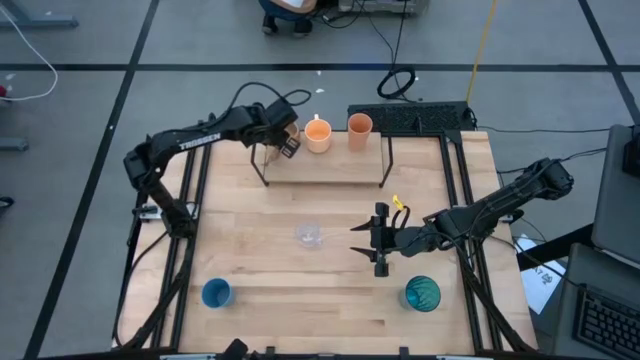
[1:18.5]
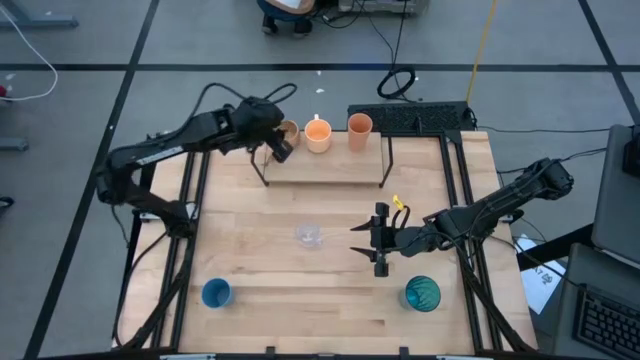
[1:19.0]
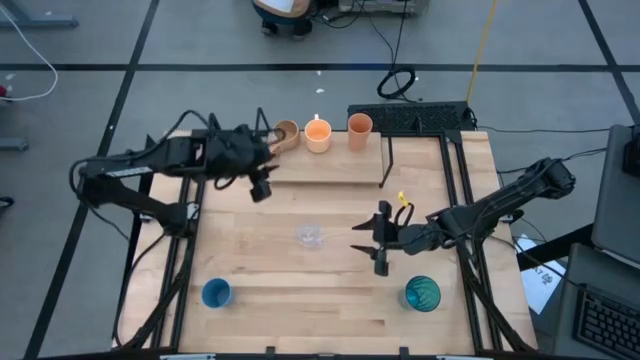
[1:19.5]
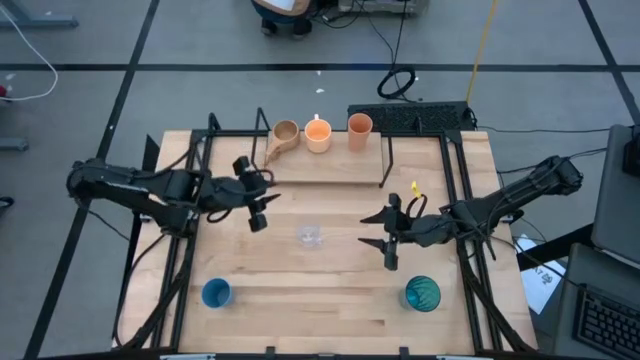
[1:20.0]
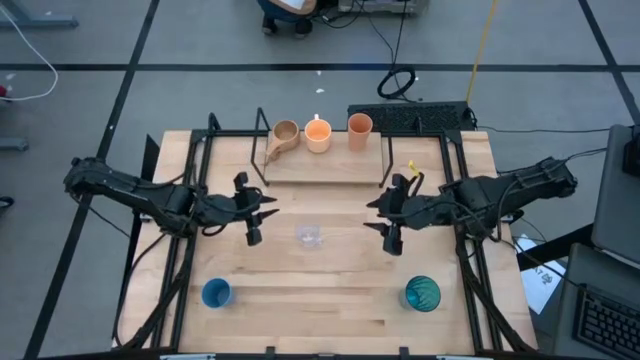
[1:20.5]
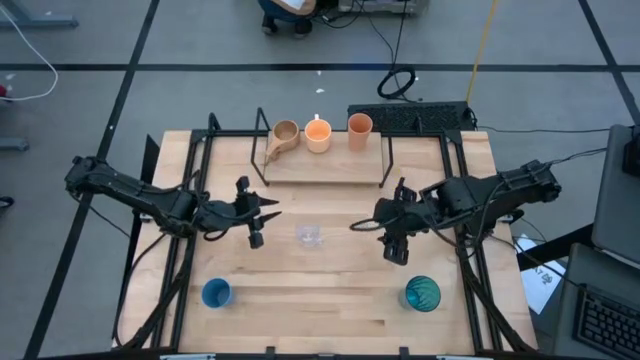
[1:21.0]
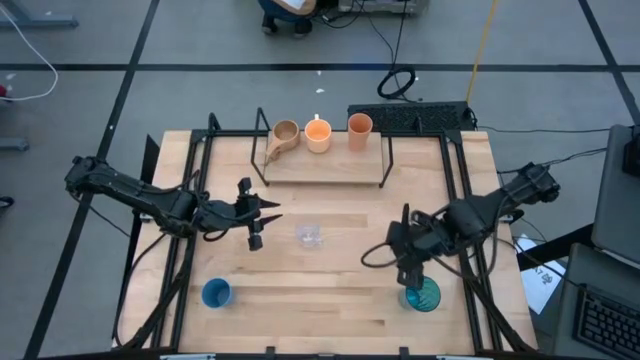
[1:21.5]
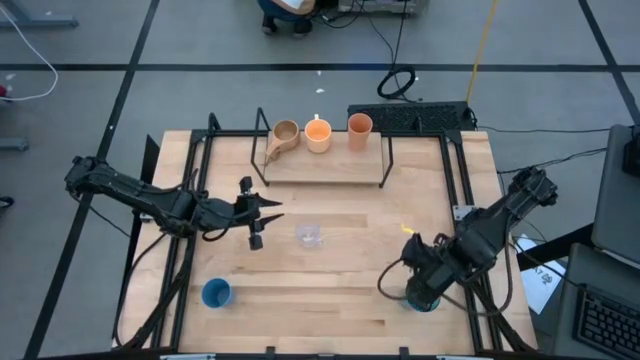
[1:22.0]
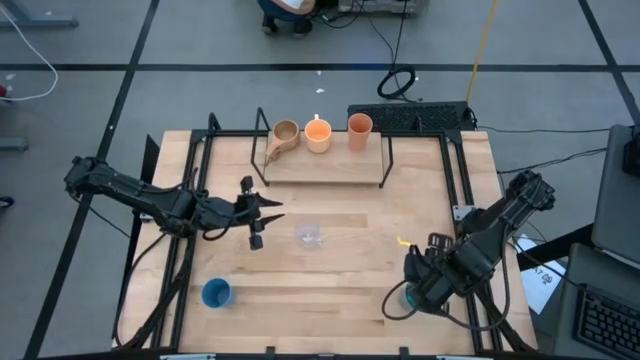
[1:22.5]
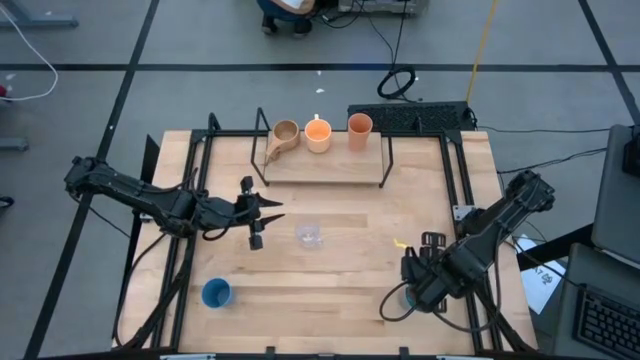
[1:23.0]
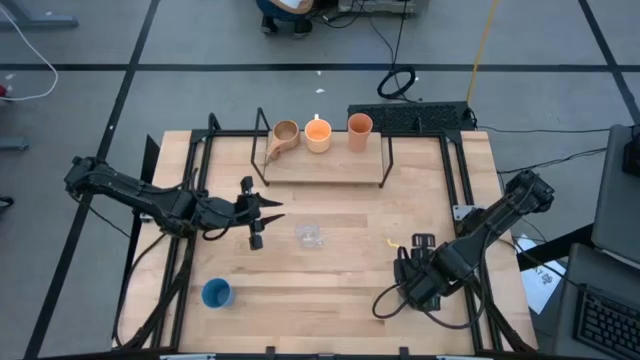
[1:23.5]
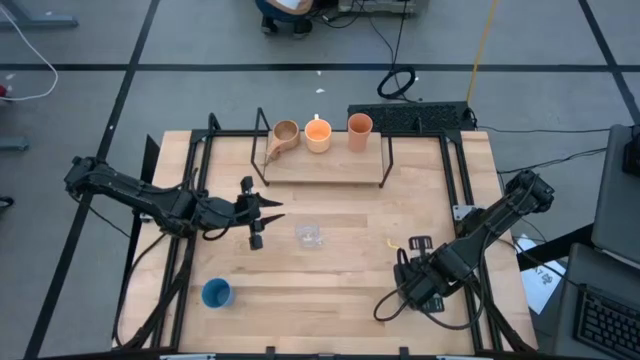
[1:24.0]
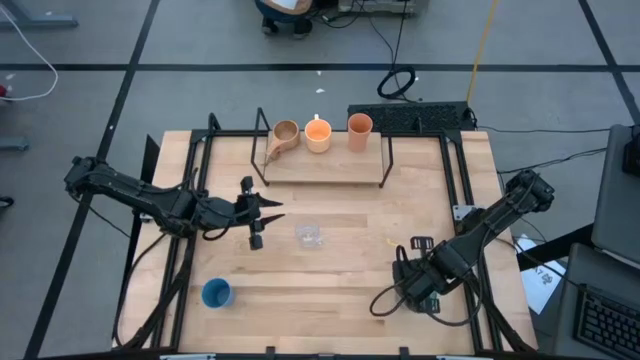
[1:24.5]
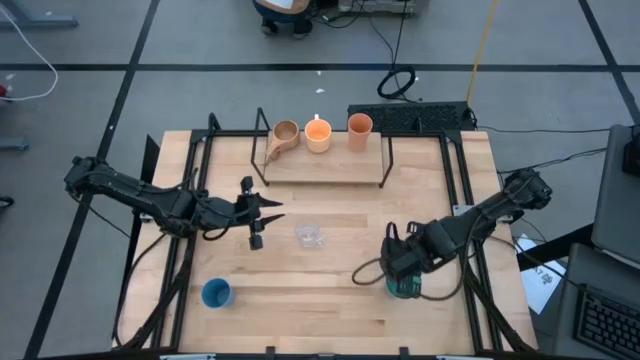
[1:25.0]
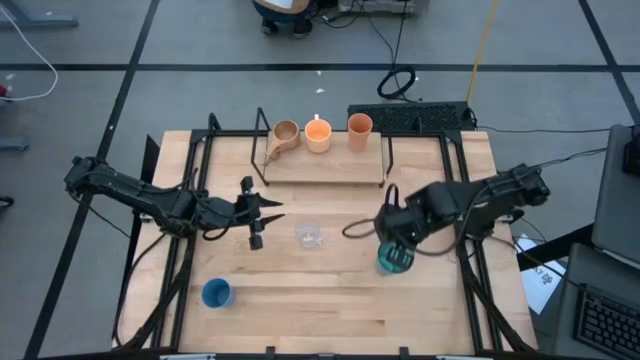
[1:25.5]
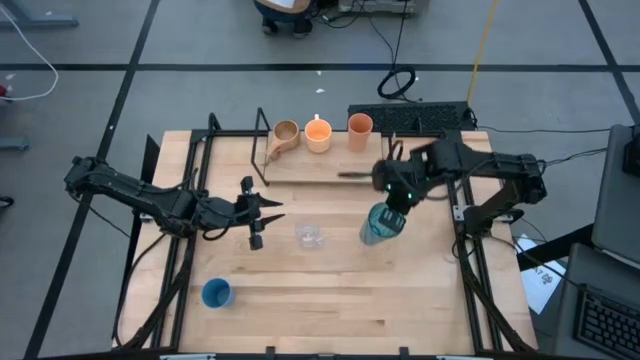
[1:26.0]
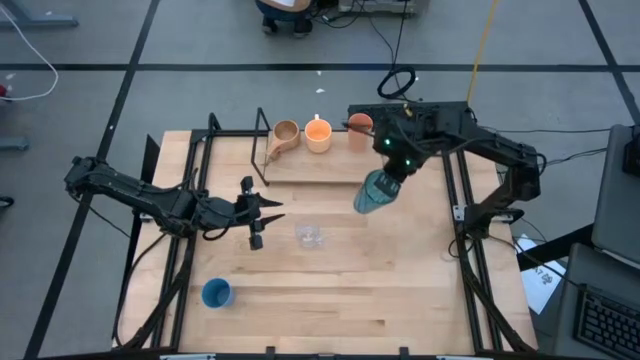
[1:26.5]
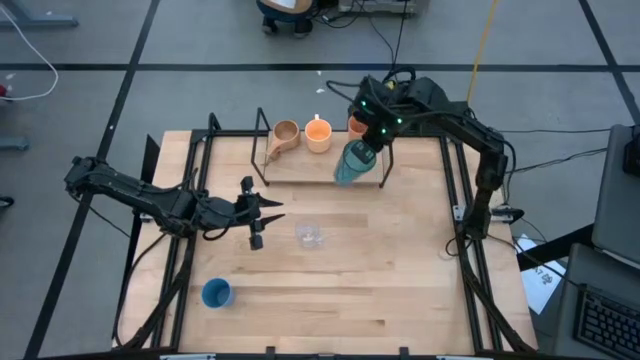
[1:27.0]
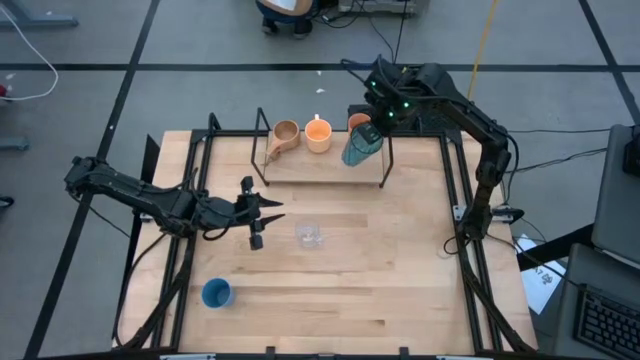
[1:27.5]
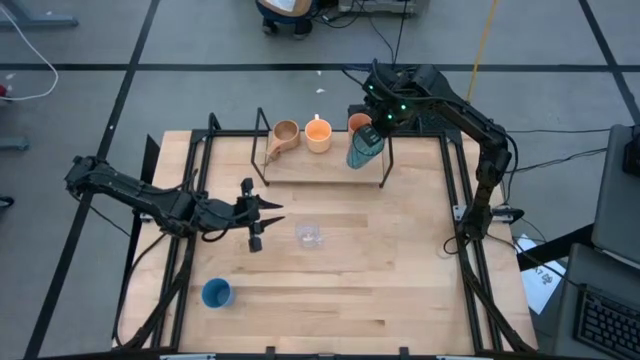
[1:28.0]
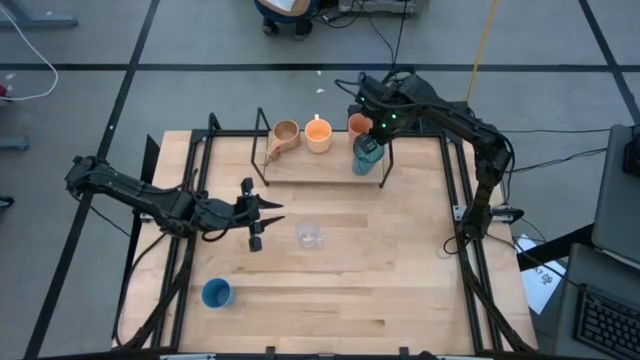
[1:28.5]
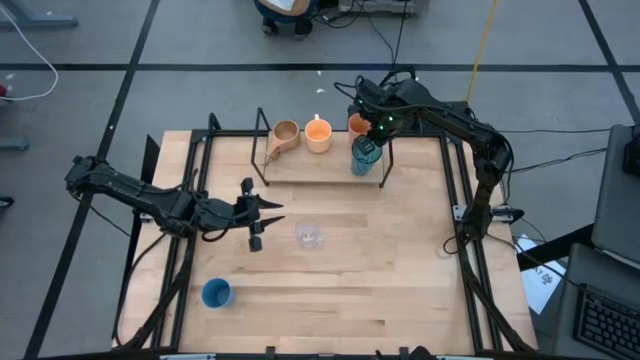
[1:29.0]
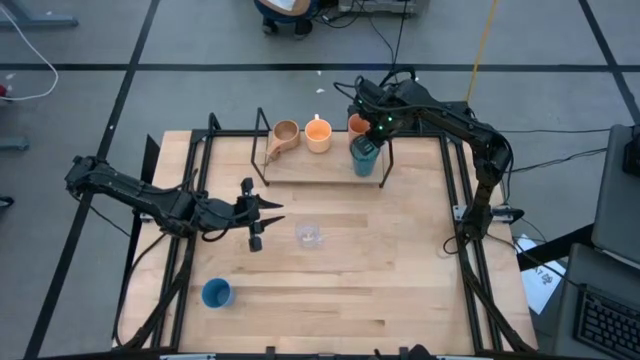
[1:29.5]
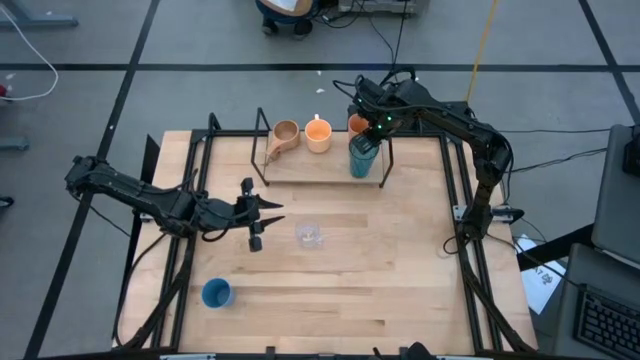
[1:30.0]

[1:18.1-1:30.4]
Task: Stack small to large cups/mugs on shelf
Put the blue glass cup on the shelf

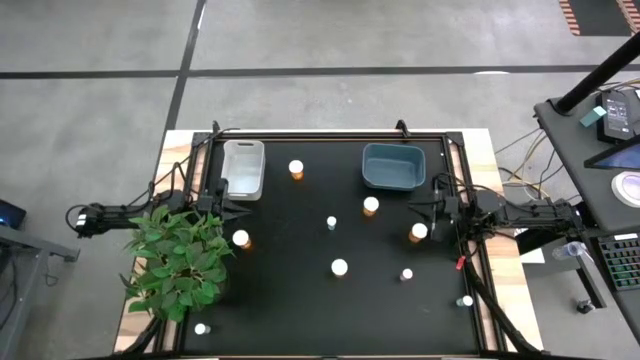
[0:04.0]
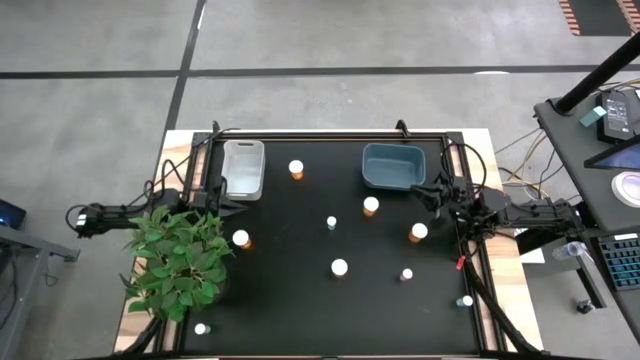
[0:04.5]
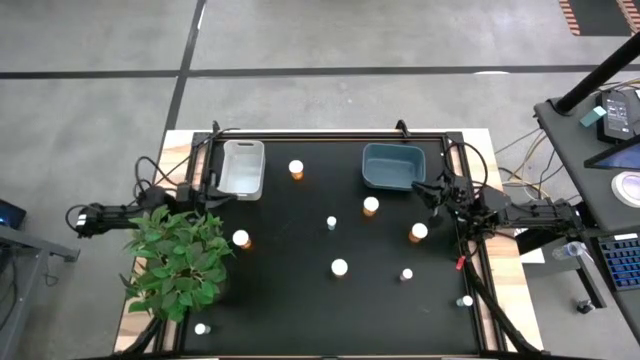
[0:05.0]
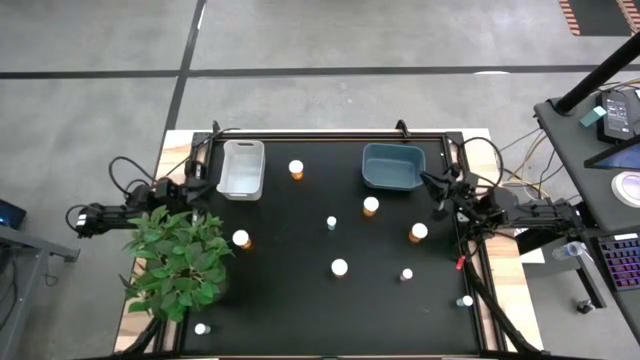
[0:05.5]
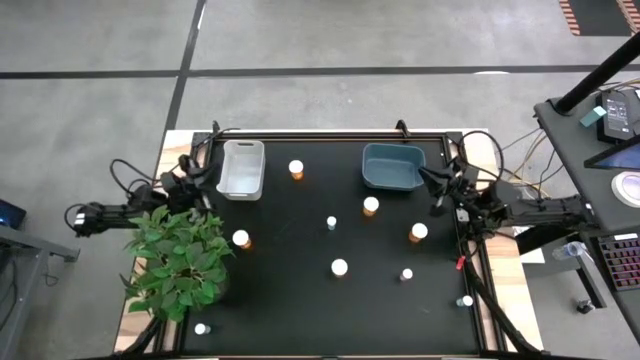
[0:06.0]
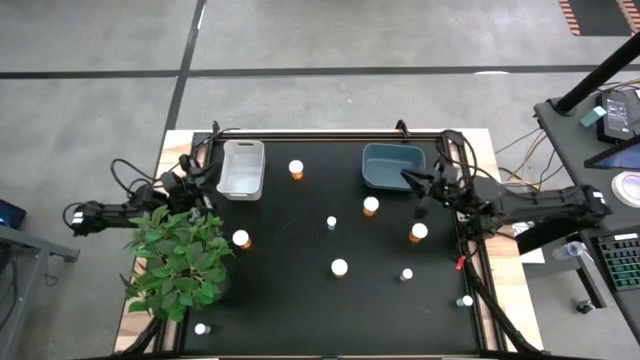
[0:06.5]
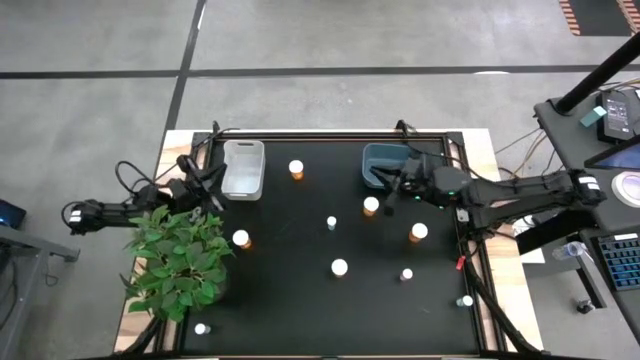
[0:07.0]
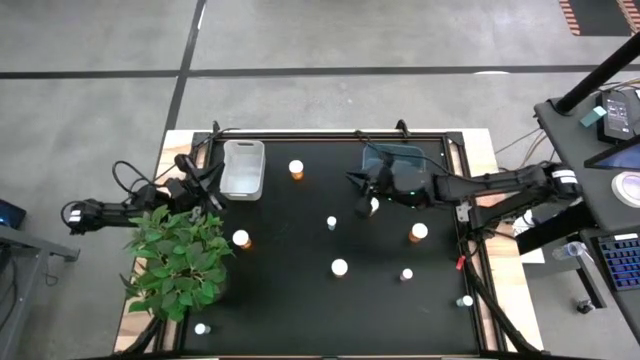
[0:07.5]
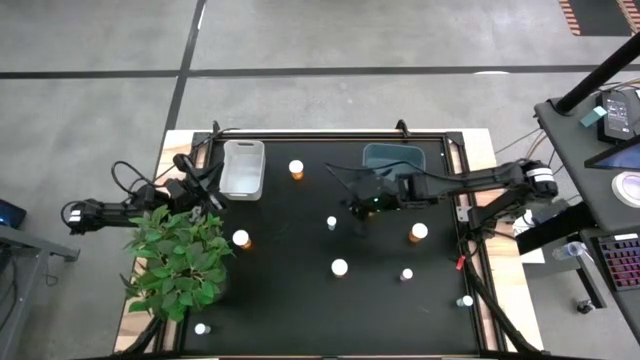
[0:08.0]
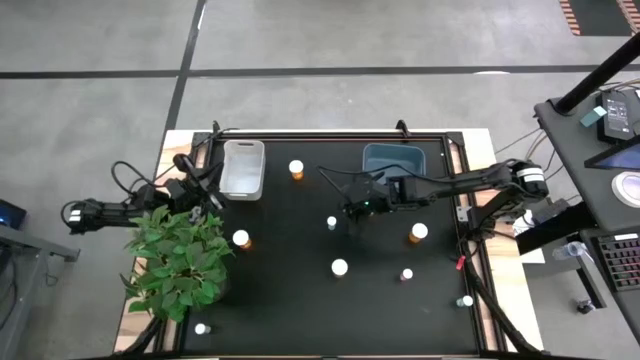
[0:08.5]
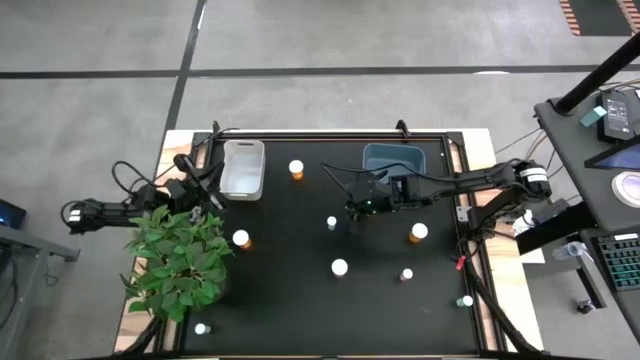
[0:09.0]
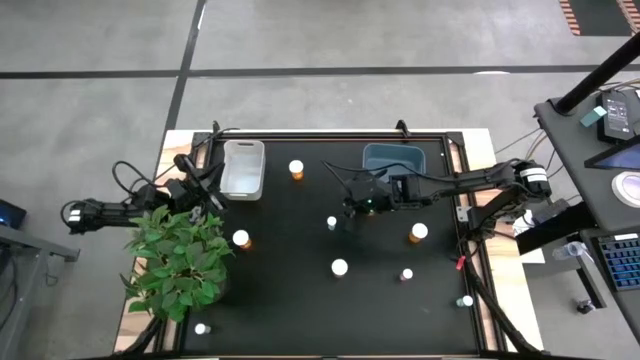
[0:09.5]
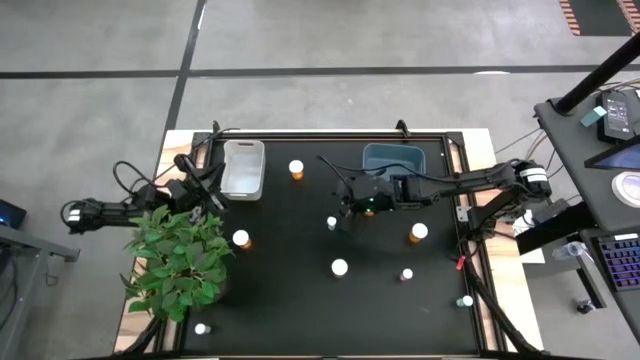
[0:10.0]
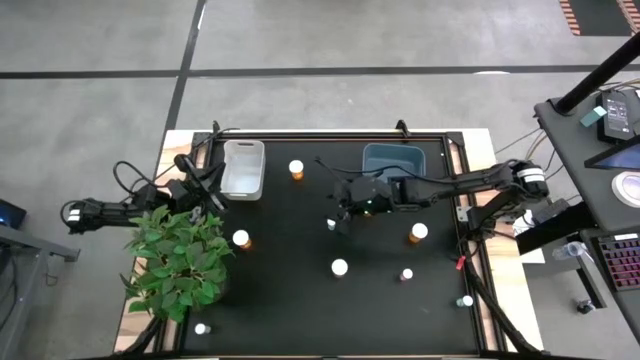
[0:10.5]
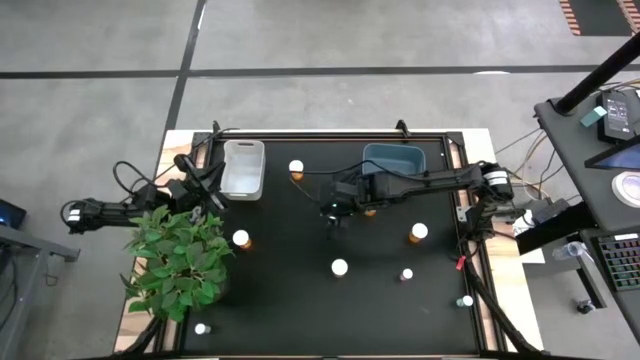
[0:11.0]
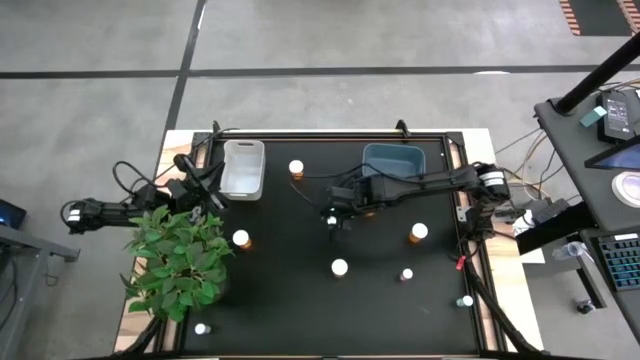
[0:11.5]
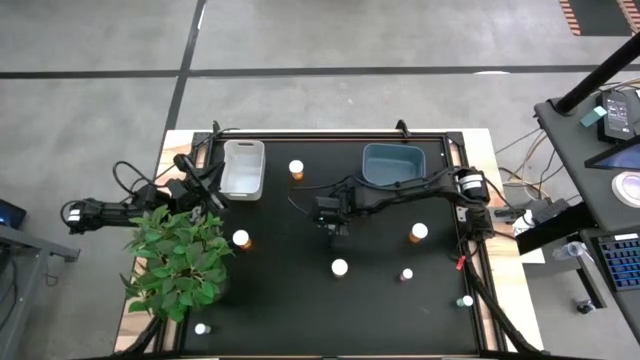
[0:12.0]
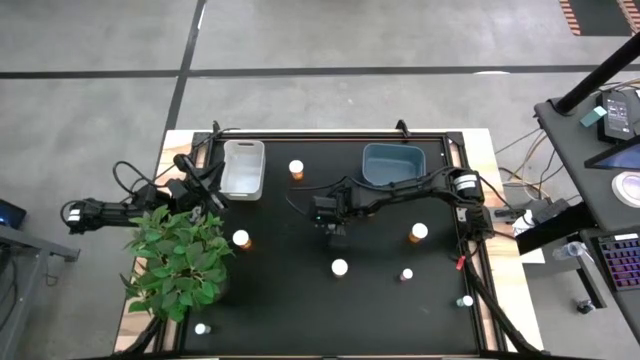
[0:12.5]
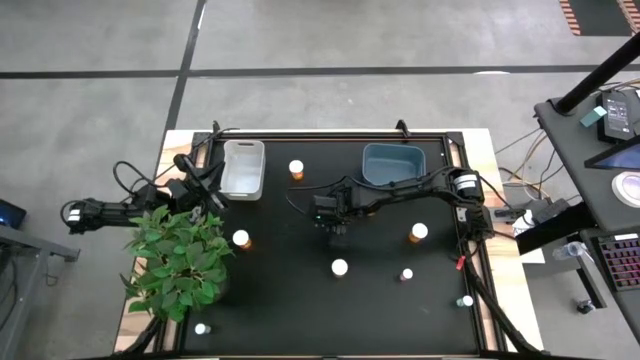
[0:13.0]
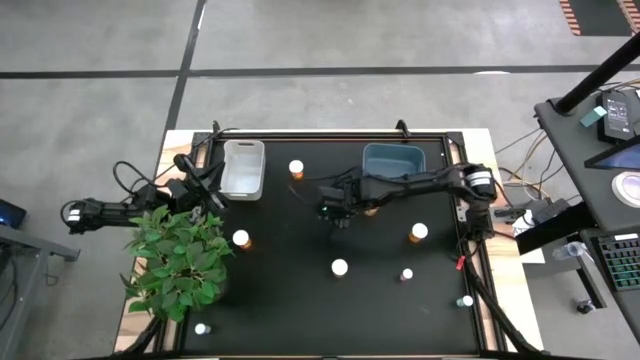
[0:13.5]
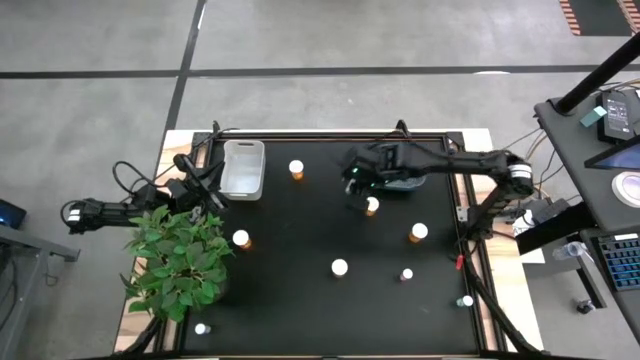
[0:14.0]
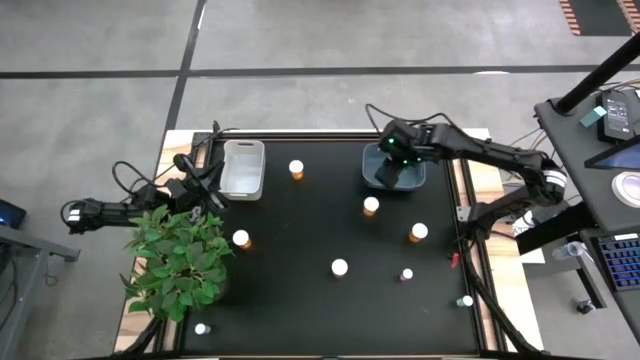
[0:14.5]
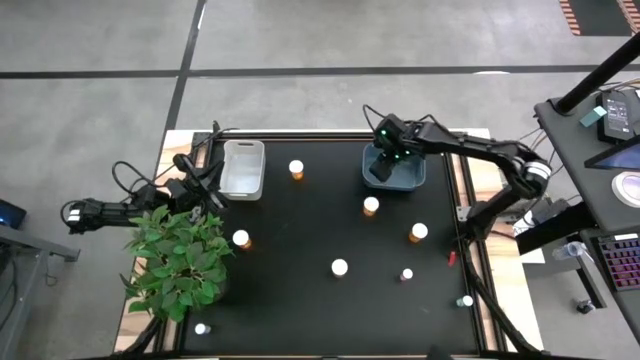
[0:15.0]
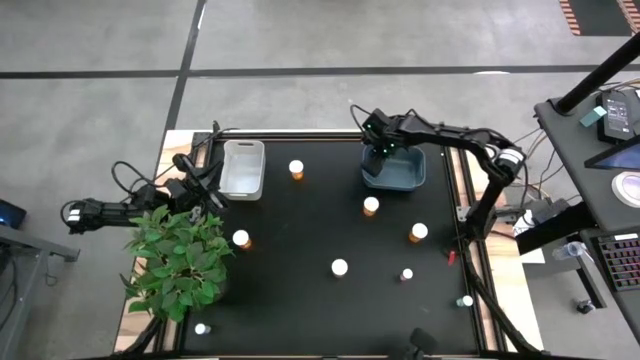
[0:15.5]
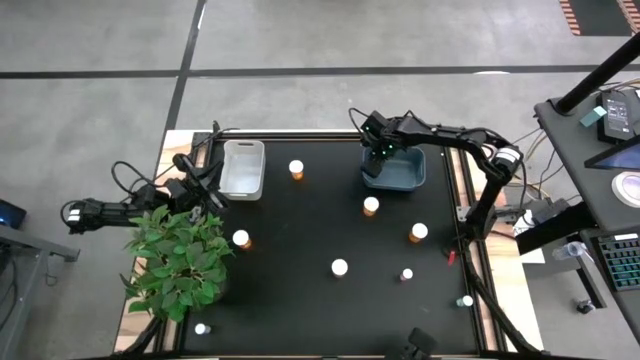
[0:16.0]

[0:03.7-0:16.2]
Task: Pick and place medicine bottles into bin by pill shape (circle, oval)
Put the small blue pill bottle into the blue bin
